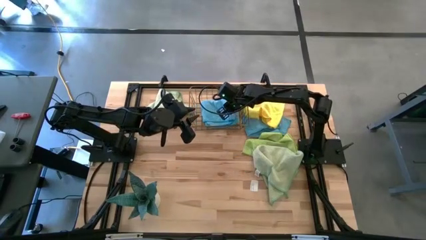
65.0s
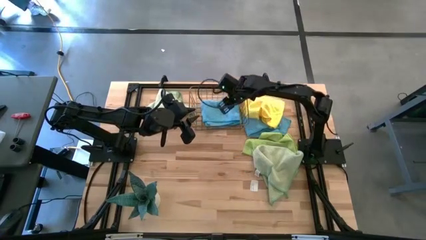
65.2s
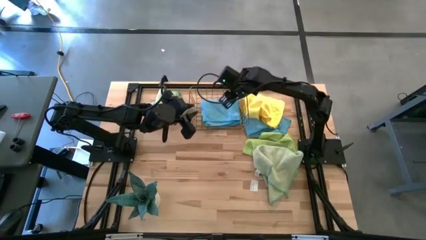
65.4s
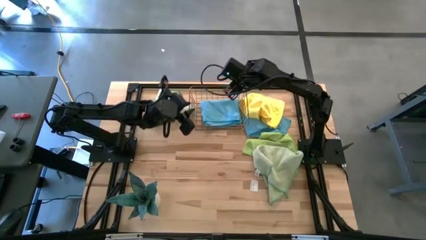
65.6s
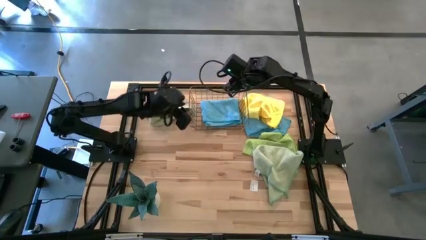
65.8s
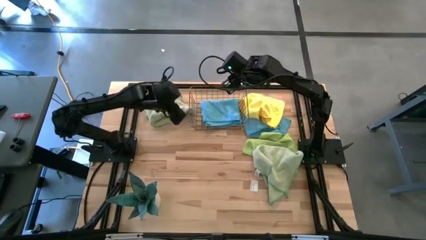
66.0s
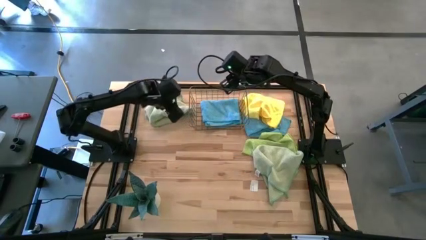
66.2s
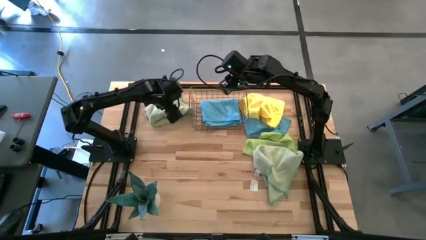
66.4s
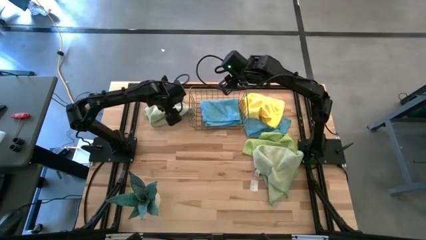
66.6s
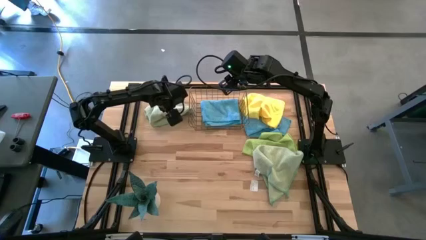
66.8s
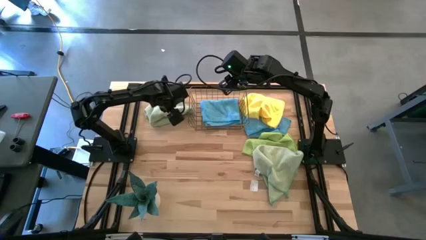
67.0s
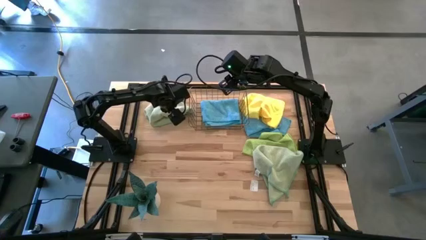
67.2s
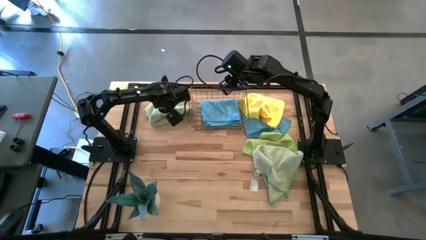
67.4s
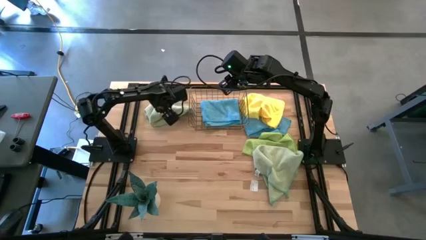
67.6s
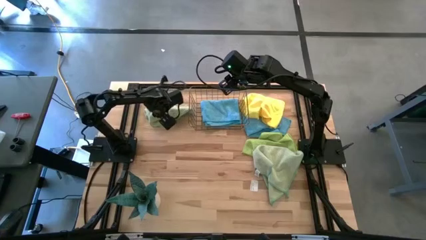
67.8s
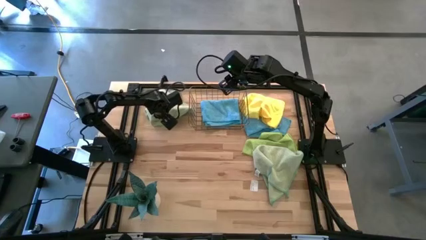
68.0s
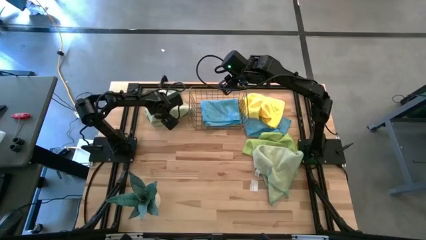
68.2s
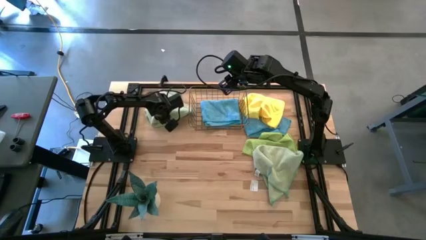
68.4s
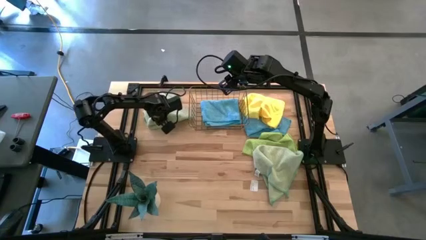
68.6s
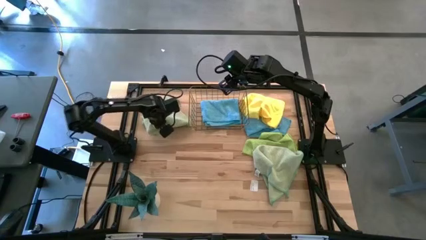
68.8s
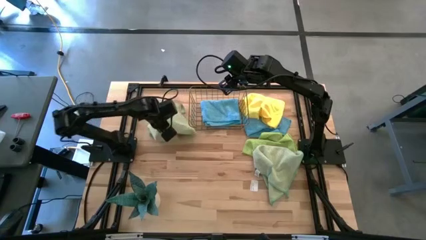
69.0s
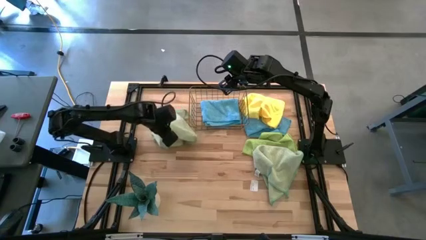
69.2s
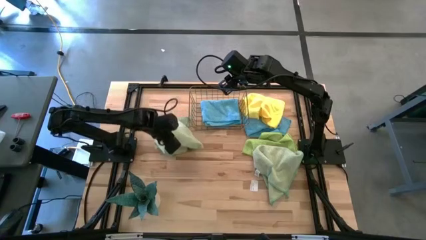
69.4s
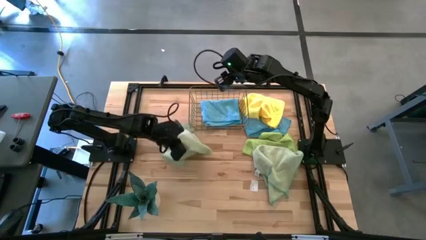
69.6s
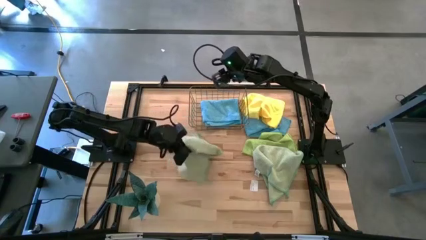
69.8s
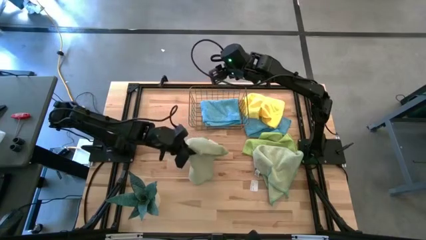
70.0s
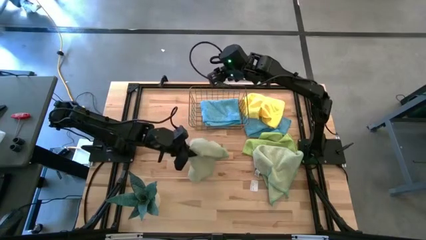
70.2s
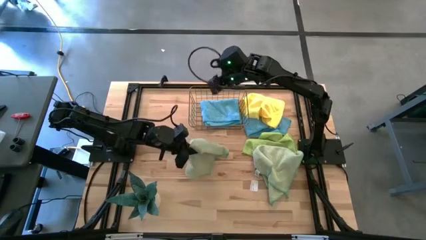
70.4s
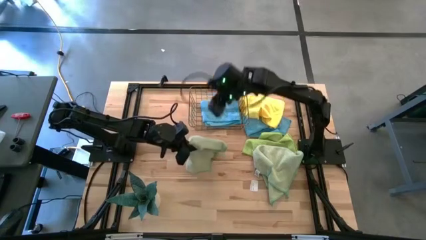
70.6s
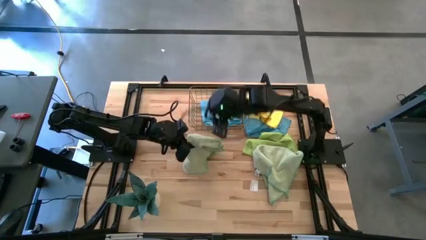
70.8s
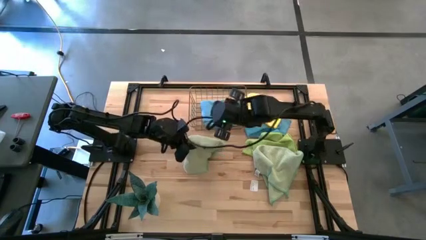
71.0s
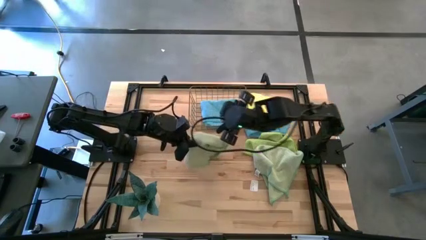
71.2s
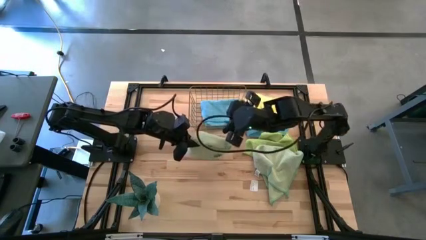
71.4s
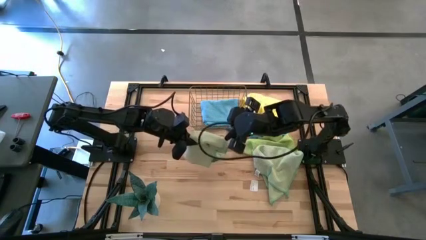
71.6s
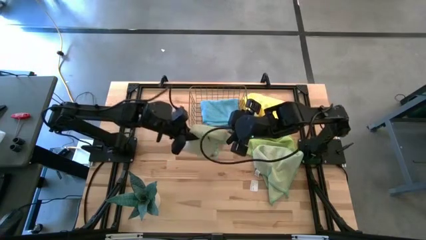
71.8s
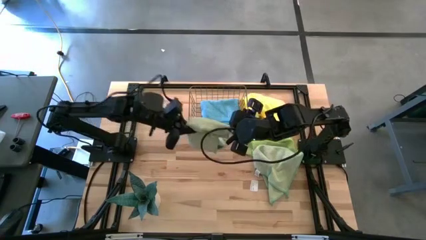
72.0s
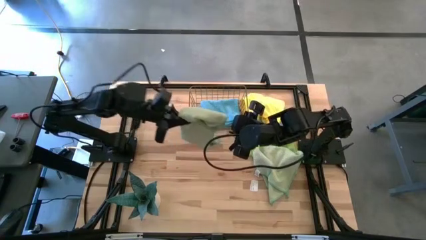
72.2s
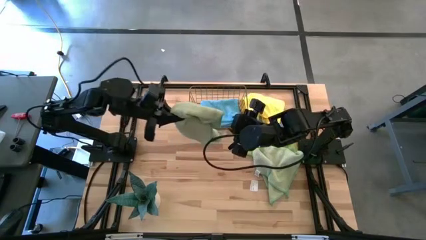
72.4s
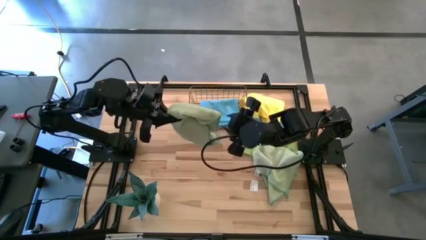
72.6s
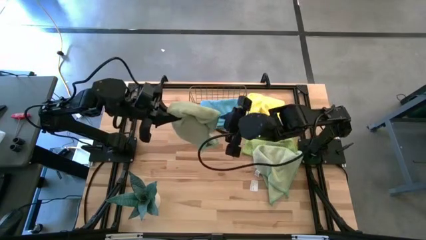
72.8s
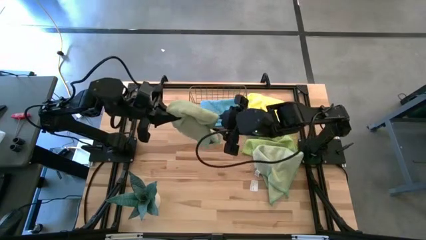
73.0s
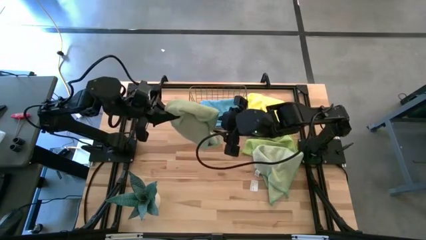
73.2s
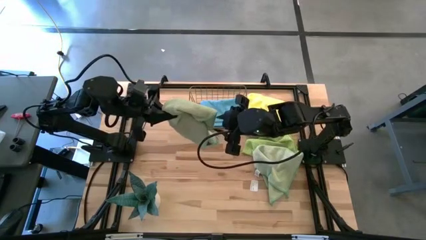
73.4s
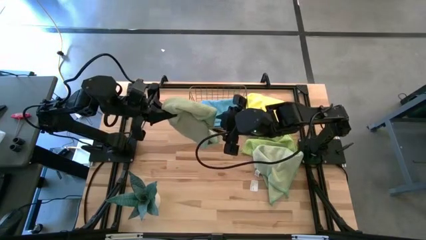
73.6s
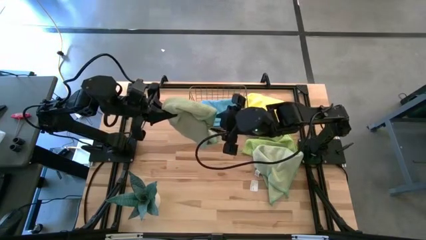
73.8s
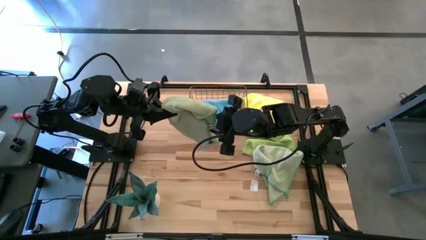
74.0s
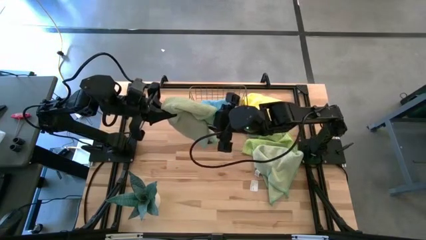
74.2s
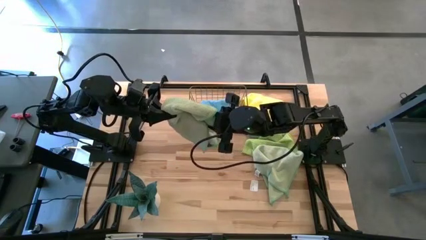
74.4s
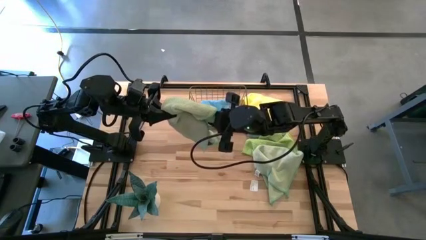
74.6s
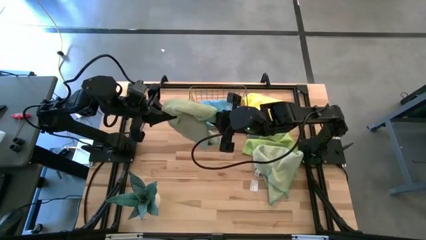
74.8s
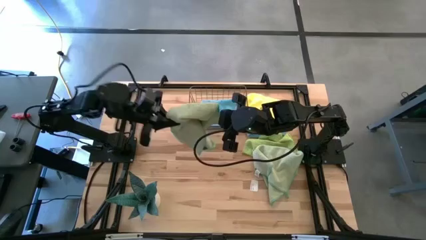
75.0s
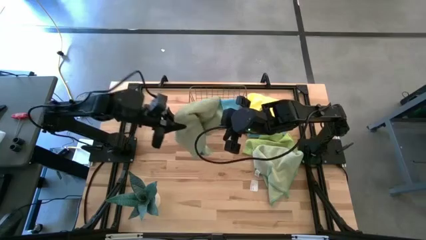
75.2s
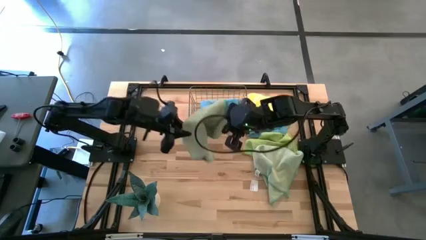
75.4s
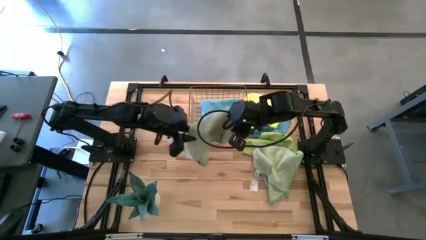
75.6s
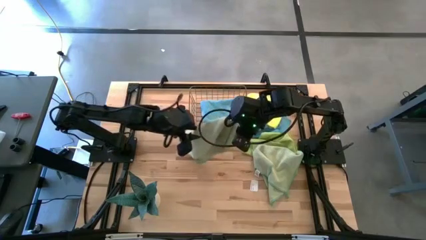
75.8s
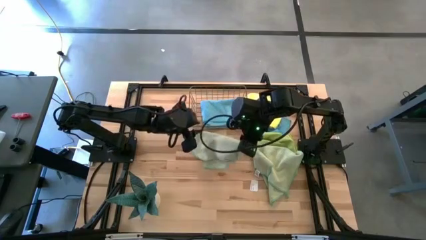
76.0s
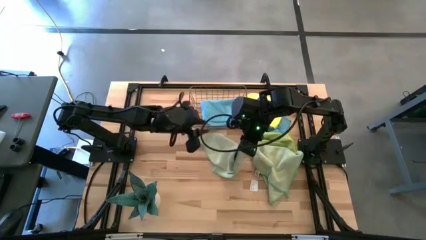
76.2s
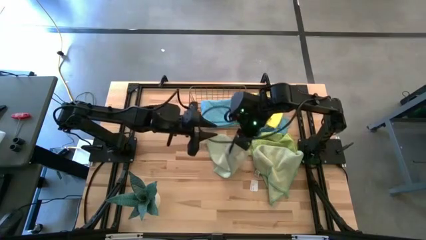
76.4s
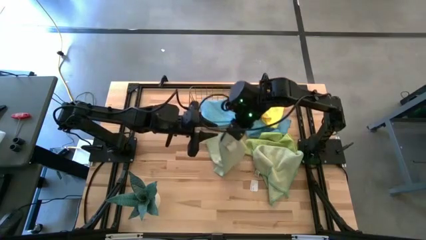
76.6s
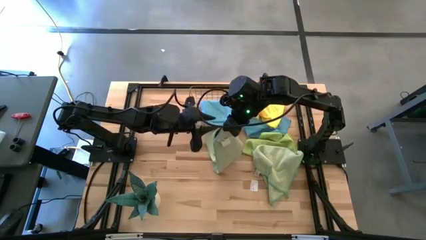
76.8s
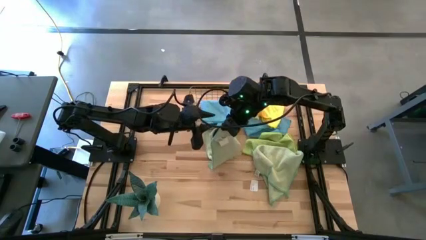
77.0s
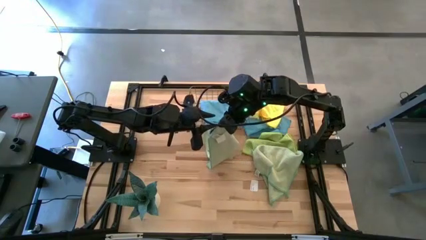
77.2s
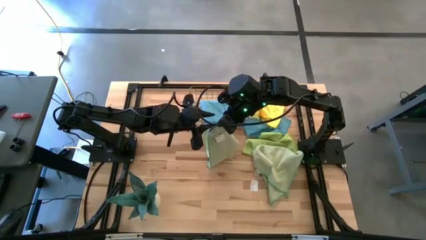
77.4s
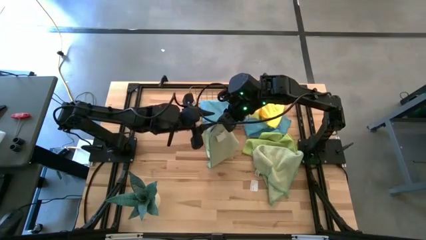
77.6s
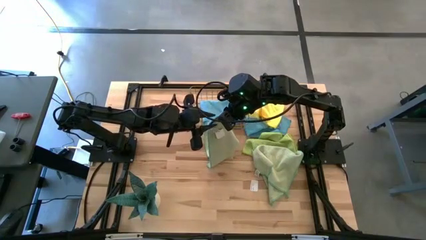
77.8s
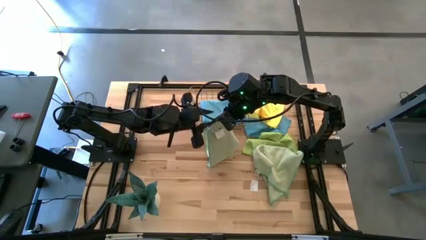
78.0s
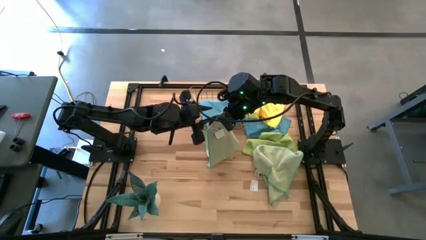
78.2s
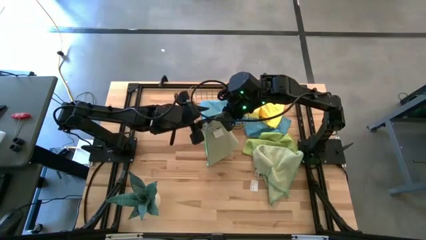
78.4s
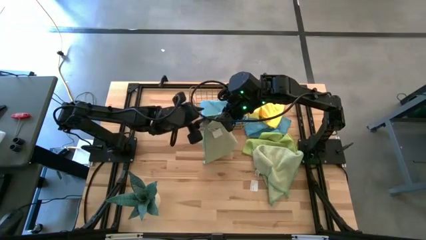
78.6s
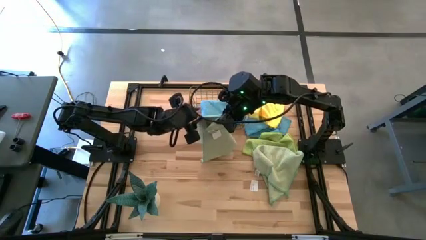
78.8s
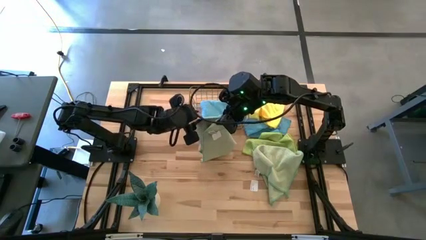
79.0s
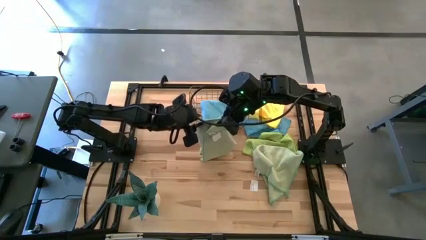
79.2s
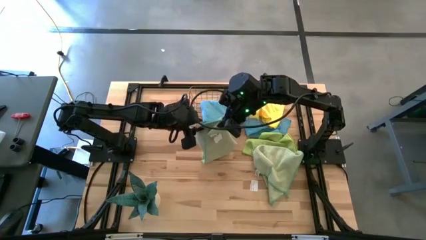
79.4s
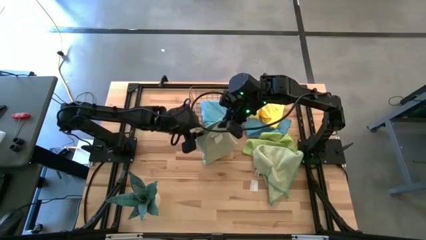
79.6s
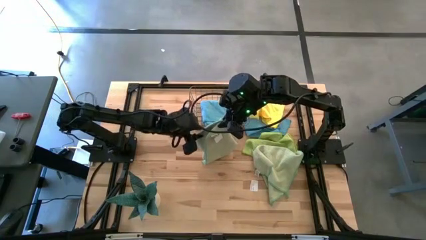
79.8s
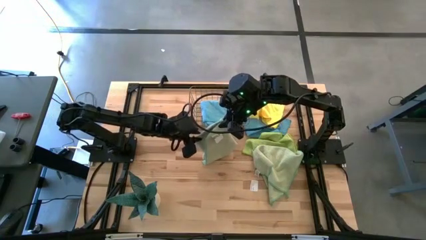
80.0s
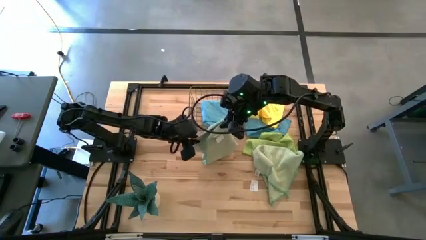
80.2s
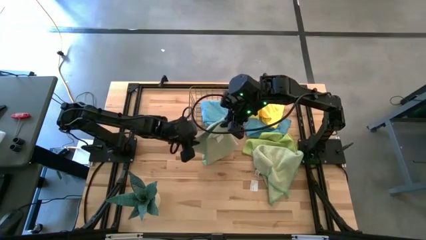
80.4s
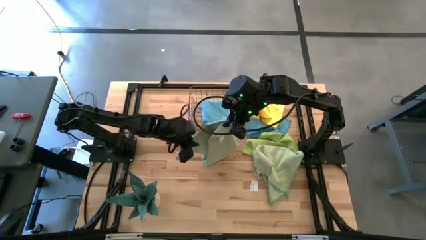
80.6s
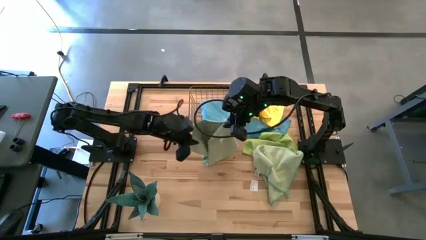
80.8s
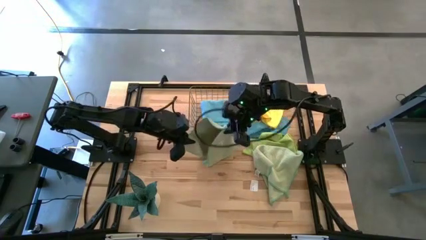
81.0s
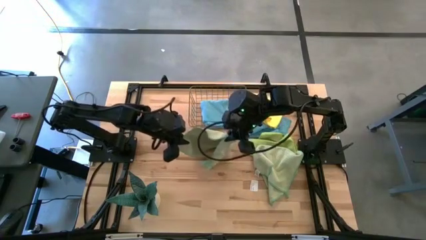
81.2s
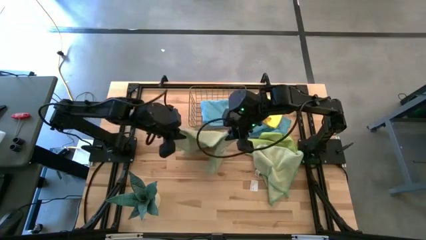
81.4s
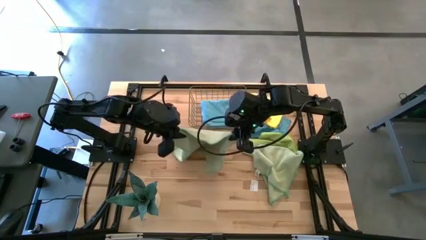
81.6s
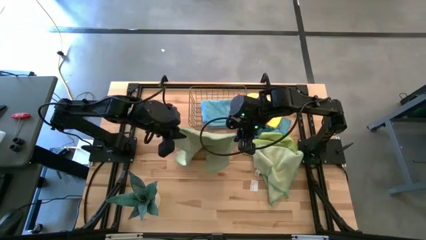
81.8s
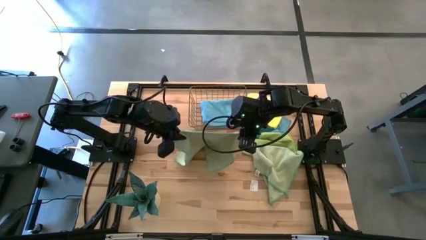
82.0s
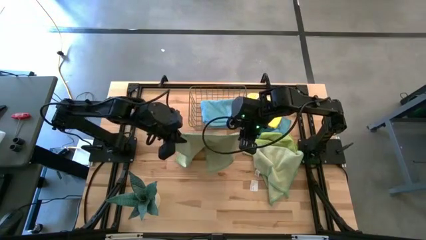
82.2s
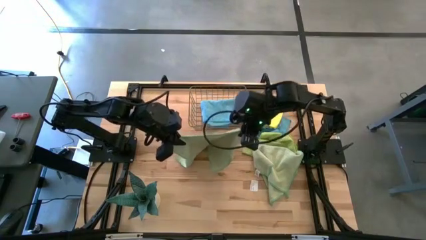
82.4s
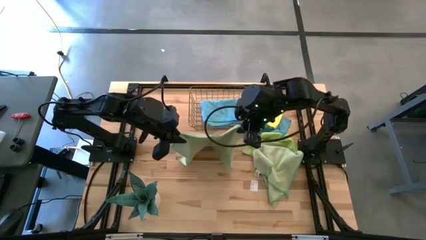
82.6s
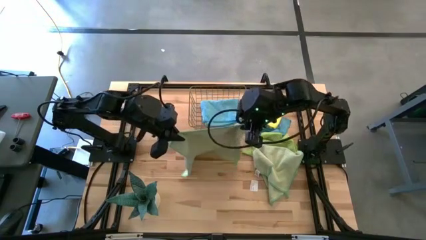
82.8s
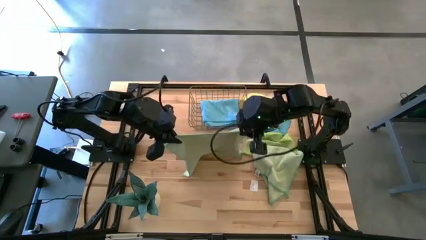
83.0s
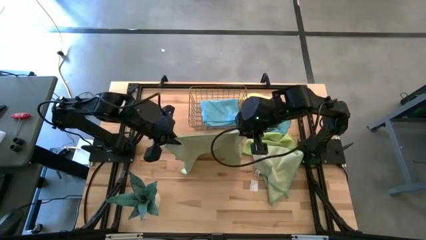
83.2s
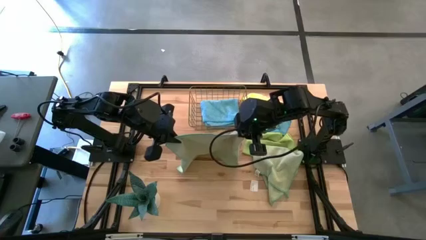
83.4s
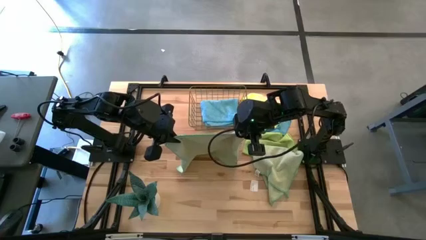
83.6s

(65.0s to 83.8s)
Task: Fold microfiber towels
Fold the left light green towel
